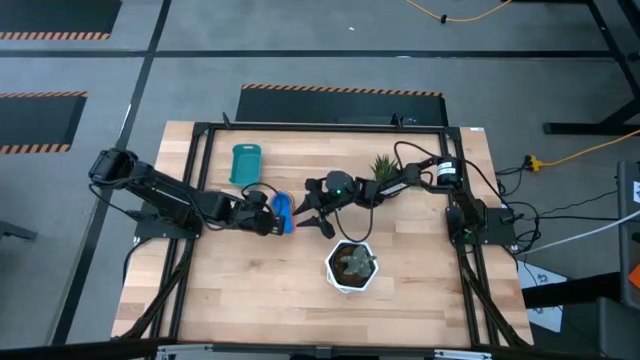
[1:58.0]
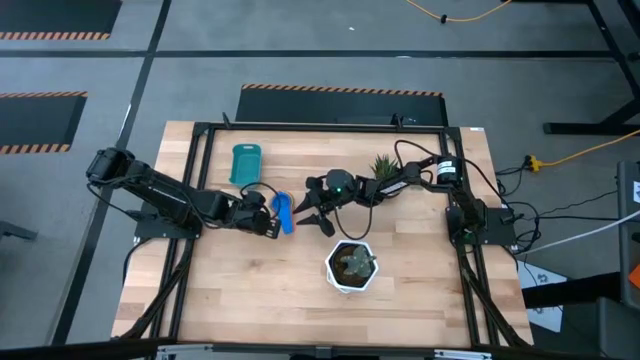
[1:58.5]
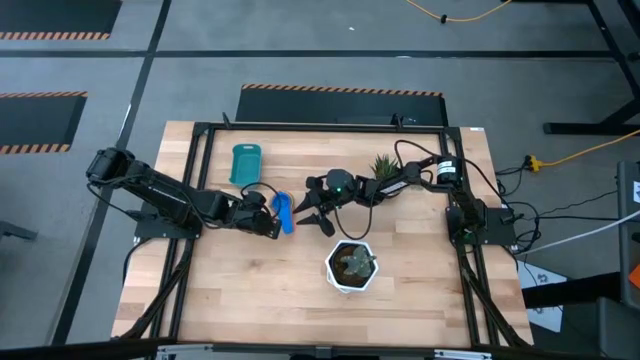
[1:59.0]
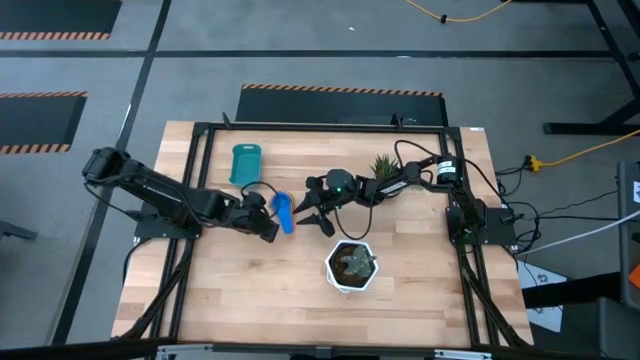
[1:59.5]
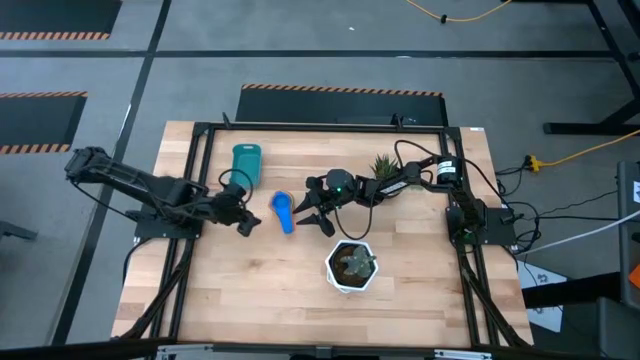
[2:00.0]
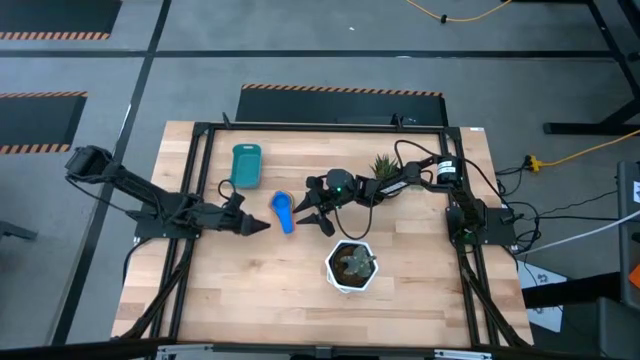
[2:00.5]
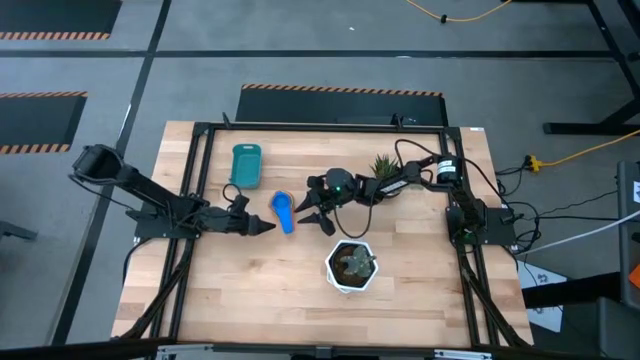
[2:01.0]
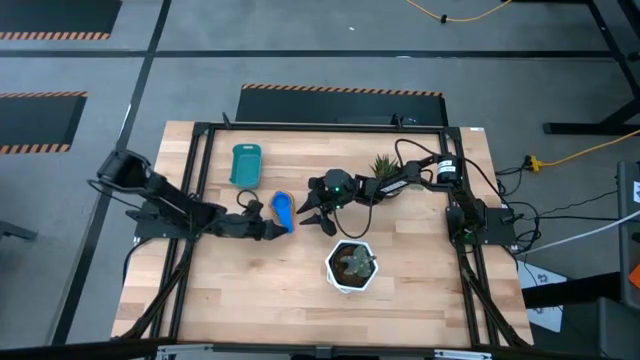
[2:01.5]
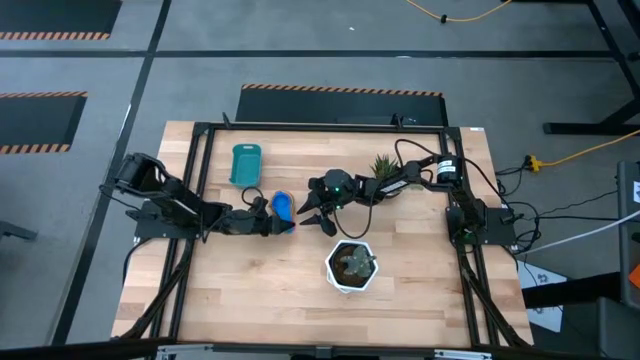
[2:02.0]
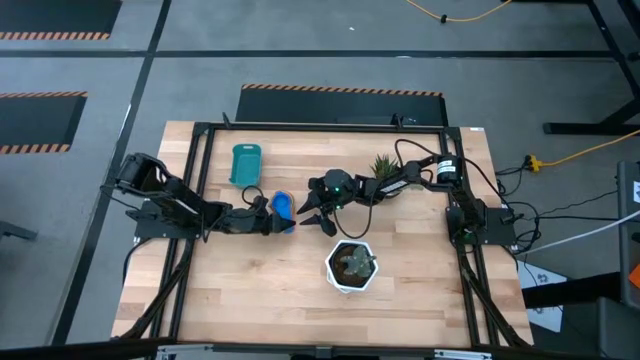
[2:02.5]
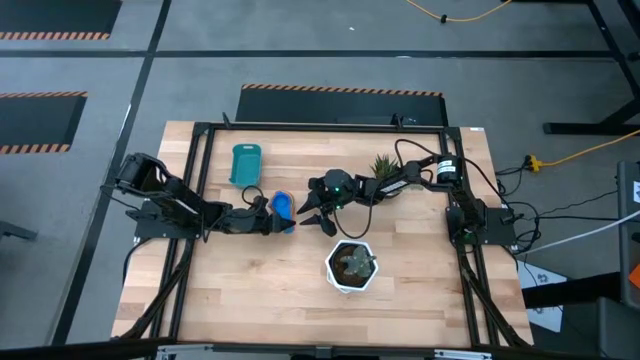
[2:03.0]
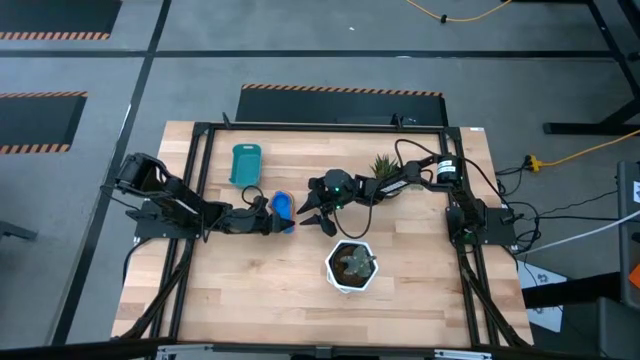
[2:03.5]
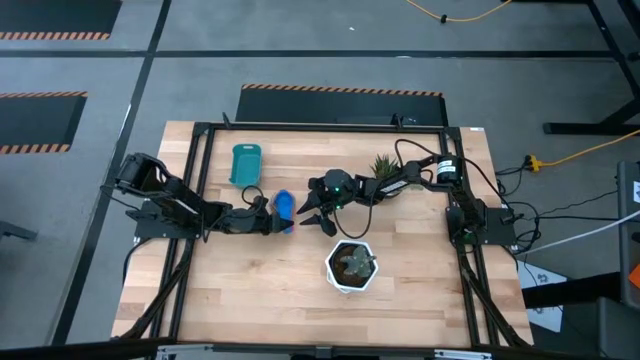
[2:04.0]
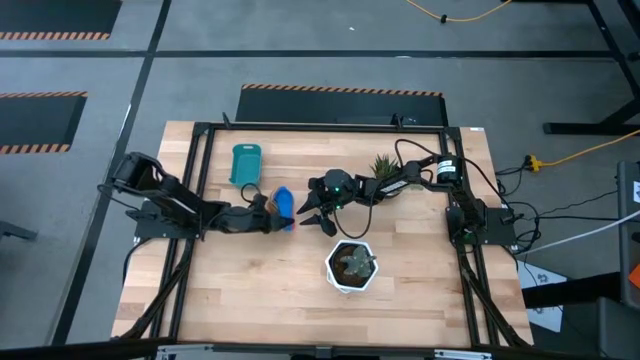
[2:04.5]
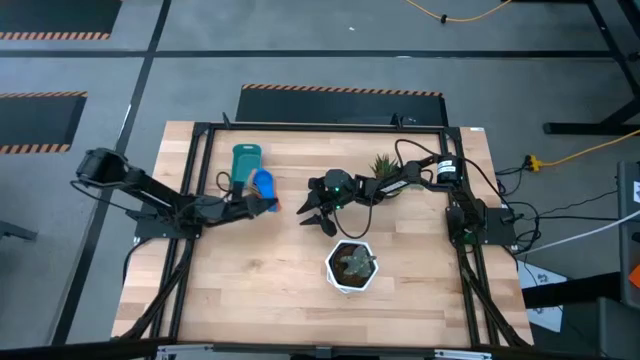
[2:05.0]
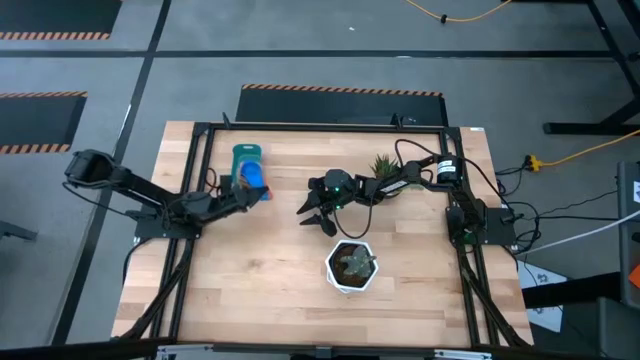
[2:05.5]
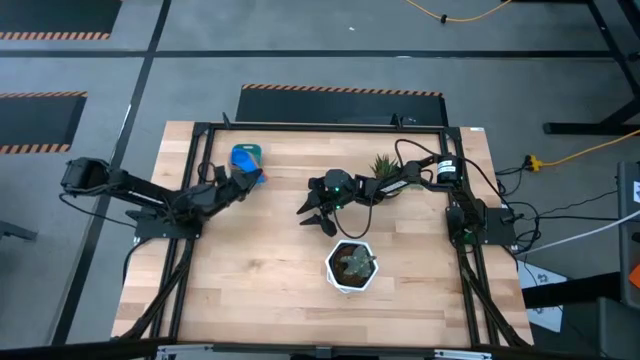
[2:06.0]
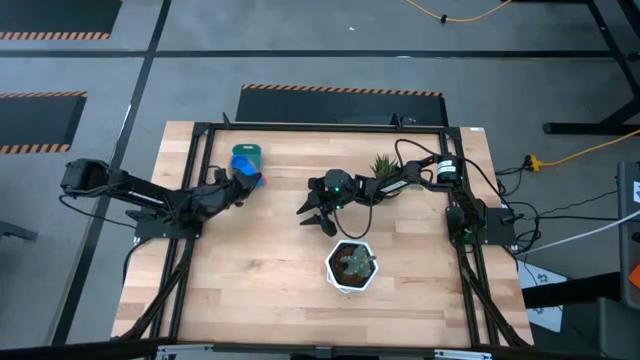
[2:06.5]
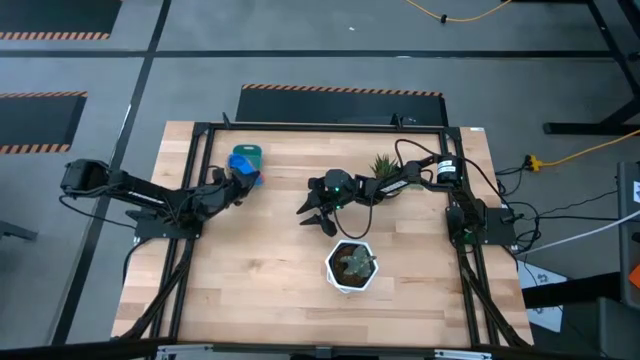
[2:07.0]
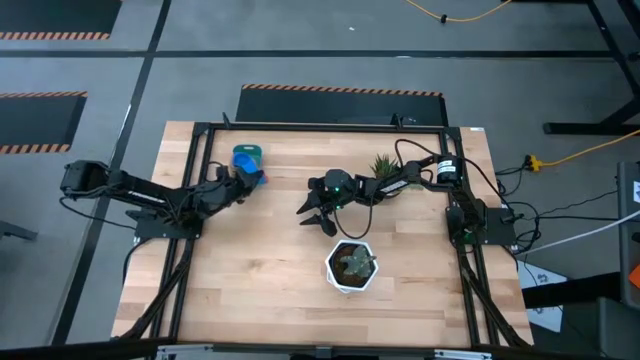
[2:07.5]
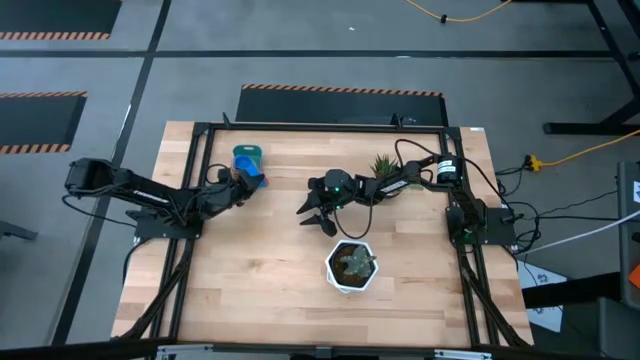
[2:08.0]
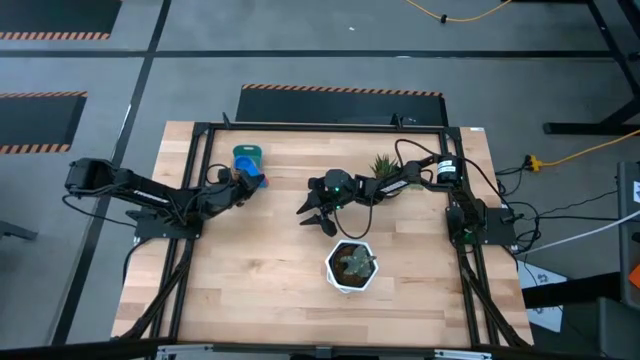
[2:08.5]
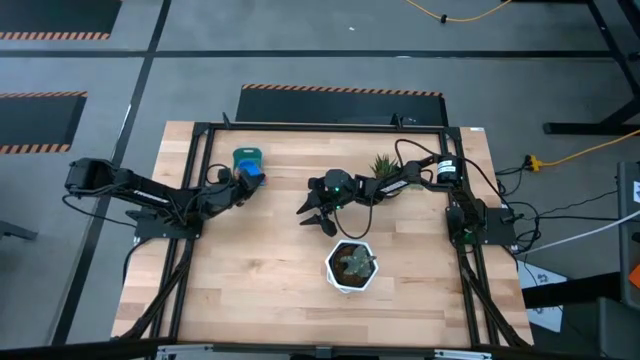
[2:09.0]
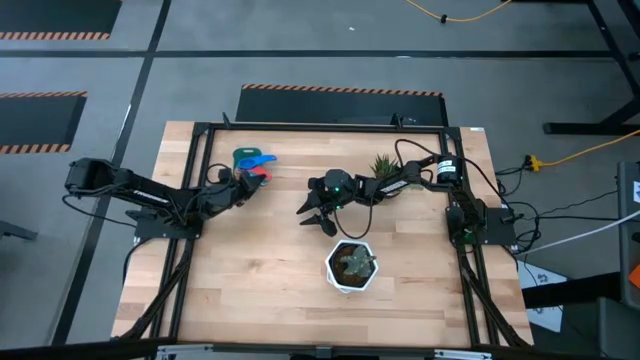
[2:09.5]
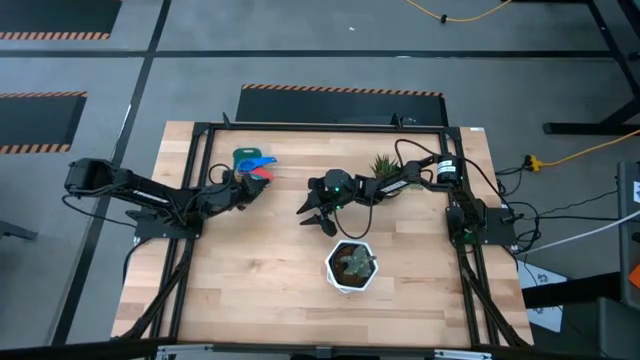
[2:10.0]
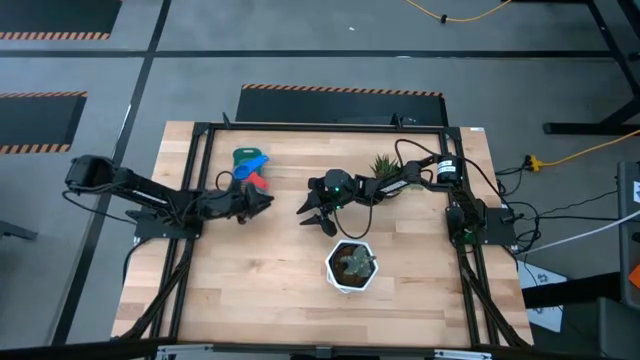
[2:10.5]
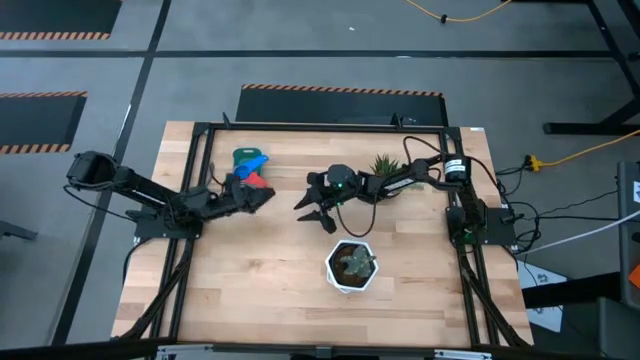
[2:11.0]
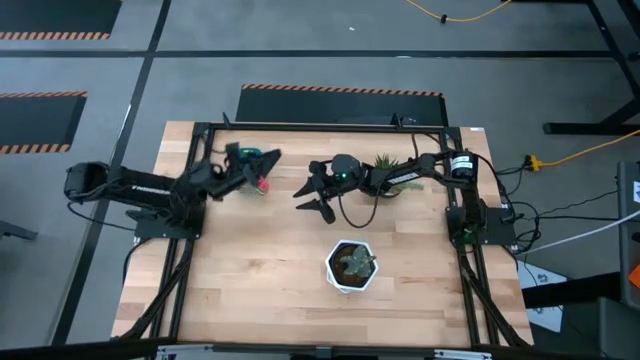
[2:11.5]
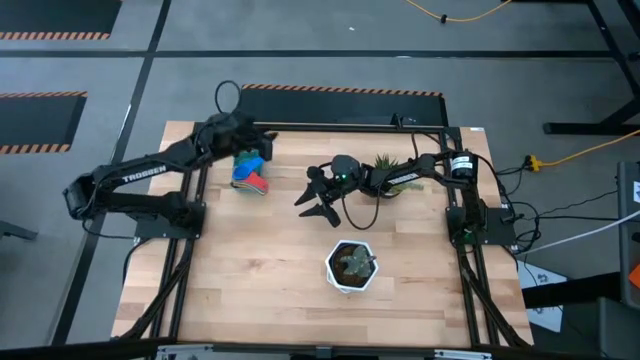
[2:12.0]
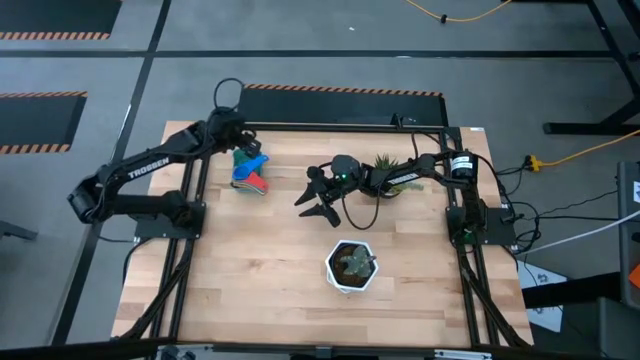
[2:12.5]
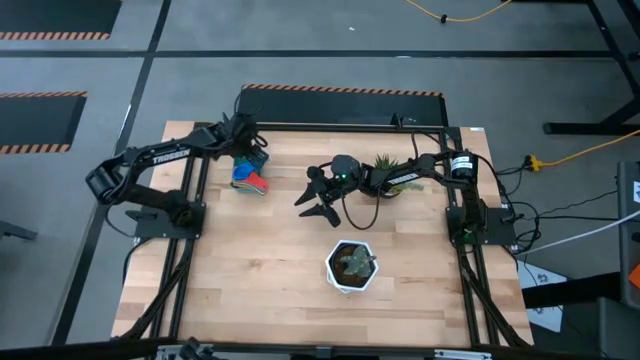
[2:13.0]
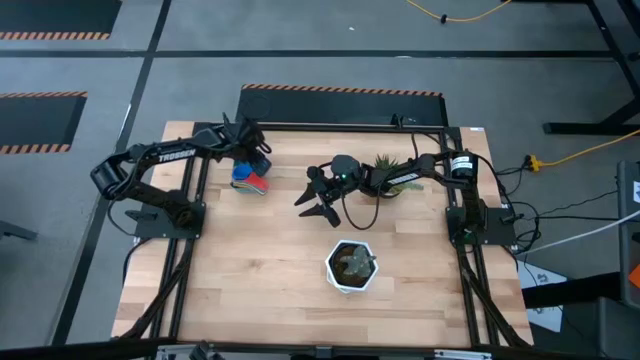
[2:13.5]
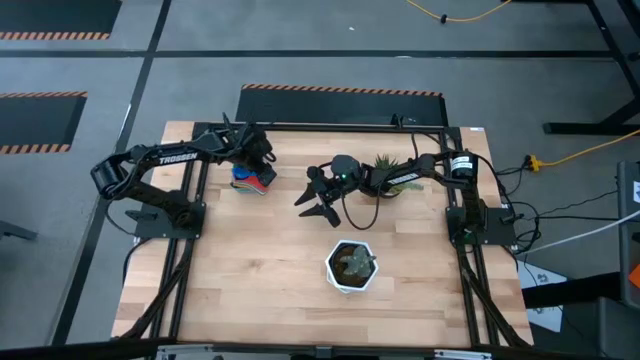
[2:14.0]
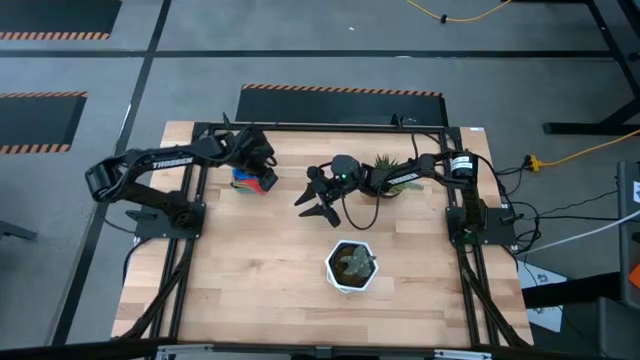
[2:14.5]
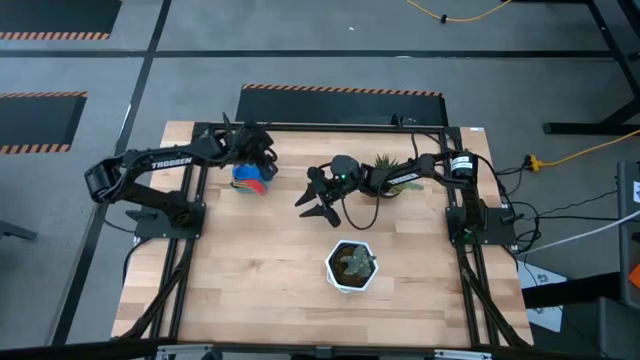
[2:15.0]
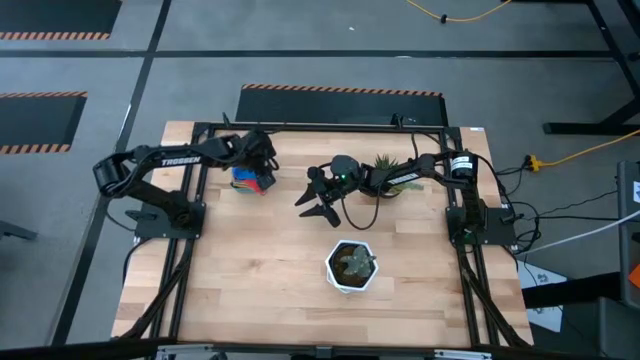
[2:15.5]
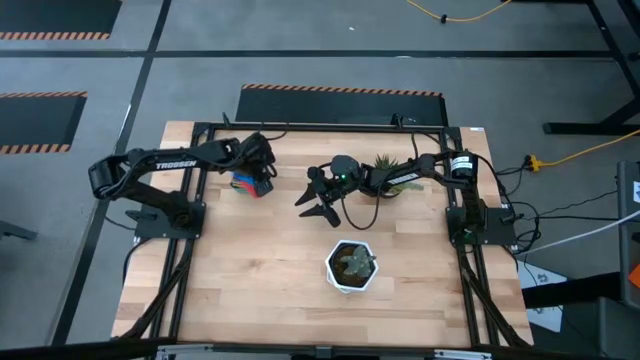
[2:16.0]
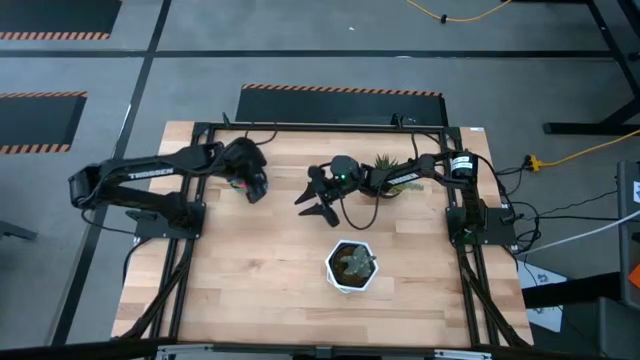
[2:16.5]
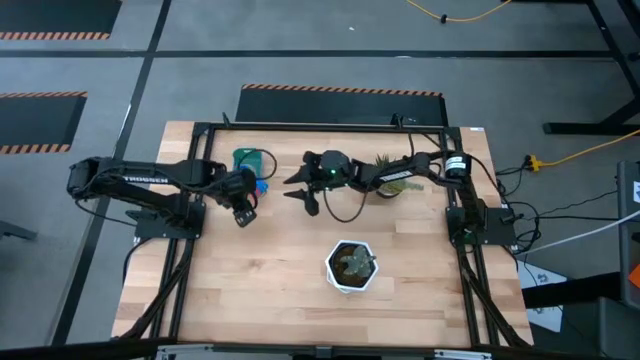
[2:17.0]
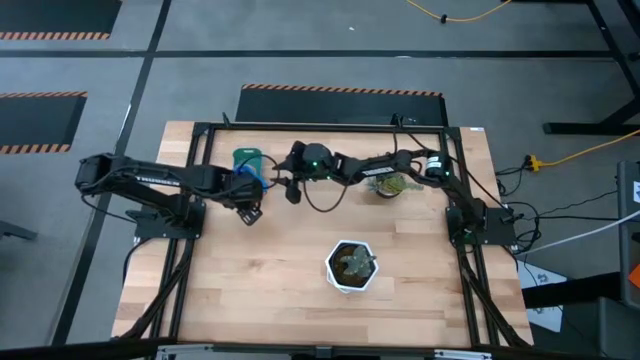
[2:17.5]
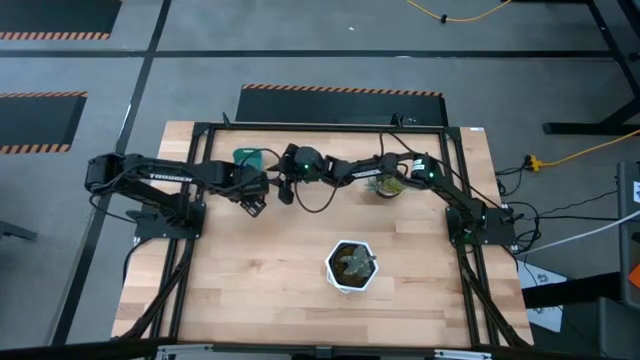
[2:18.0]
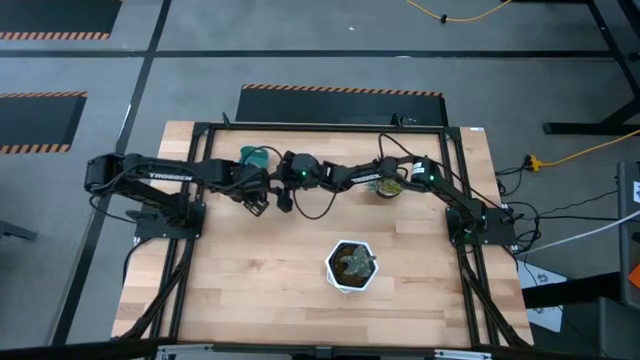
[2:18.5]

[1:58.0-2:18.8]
Task: Nest measuring cups in basket
Put the nested measuring cups into the green bin
